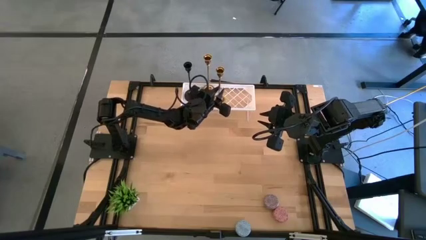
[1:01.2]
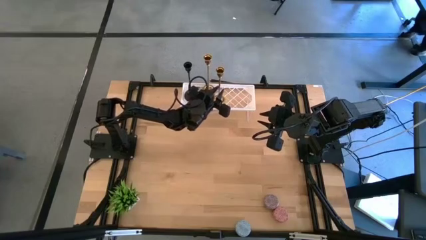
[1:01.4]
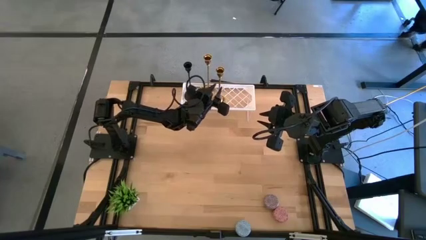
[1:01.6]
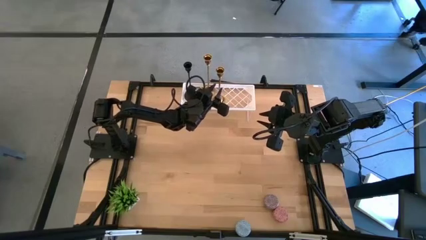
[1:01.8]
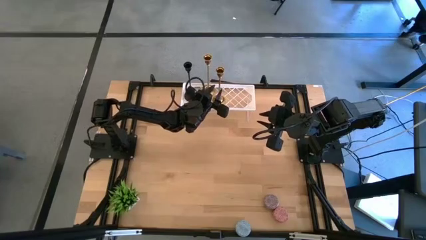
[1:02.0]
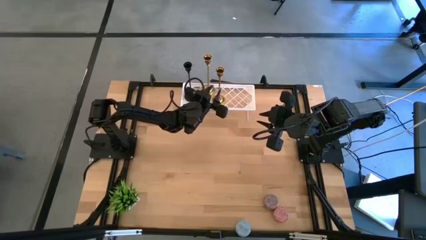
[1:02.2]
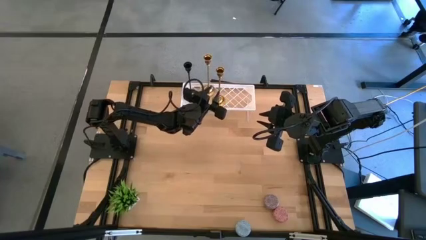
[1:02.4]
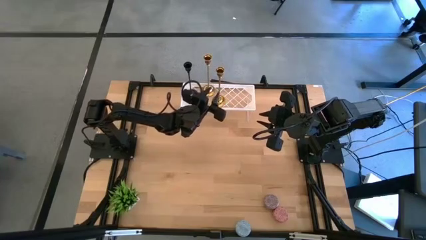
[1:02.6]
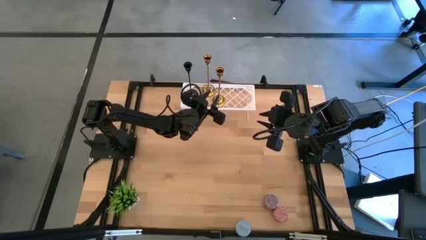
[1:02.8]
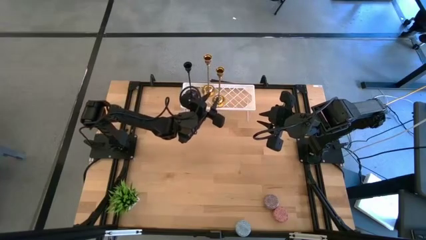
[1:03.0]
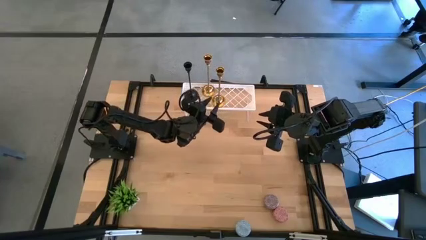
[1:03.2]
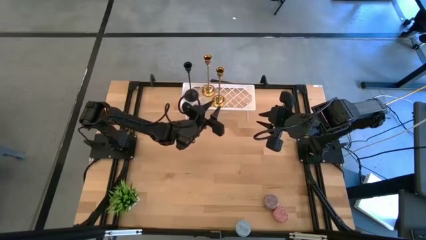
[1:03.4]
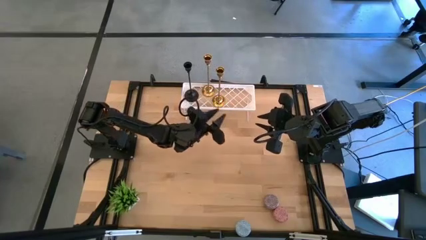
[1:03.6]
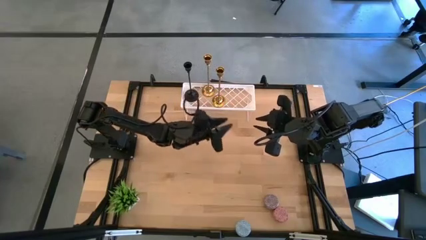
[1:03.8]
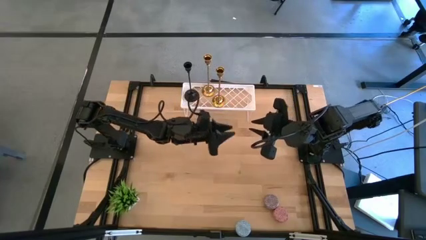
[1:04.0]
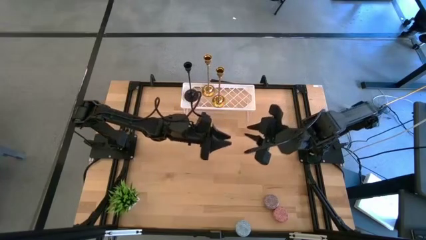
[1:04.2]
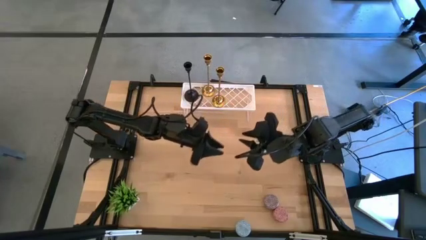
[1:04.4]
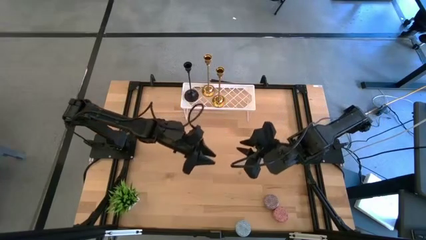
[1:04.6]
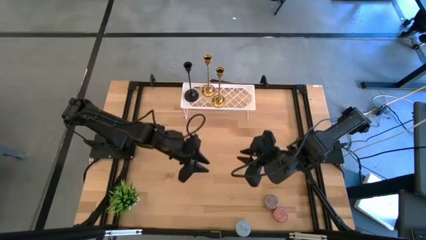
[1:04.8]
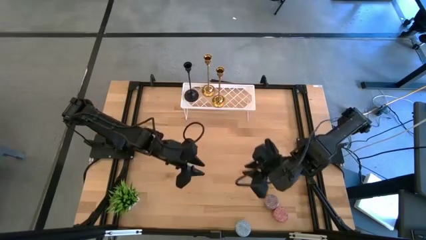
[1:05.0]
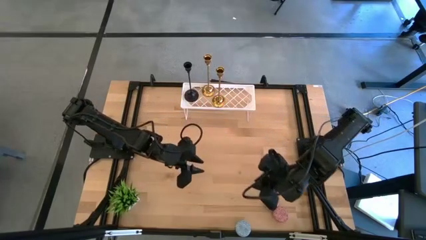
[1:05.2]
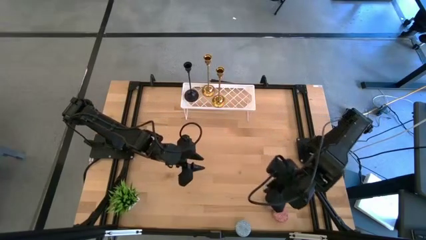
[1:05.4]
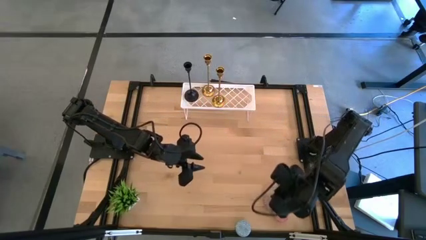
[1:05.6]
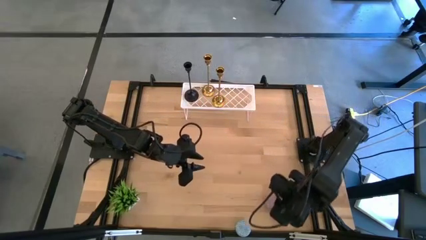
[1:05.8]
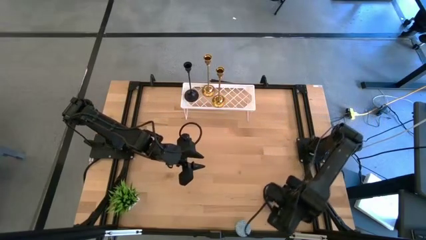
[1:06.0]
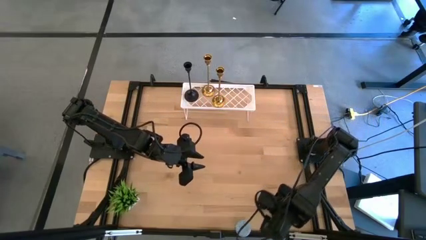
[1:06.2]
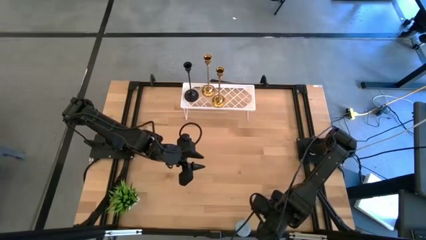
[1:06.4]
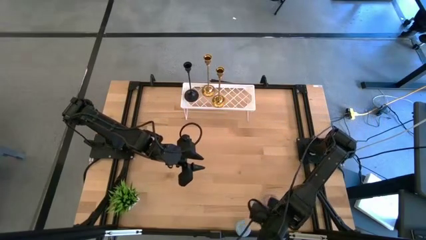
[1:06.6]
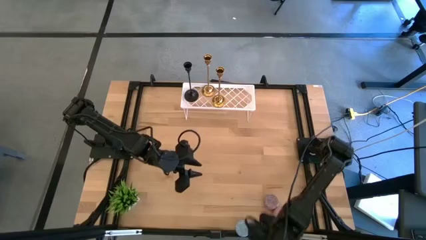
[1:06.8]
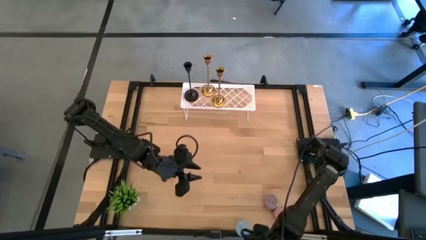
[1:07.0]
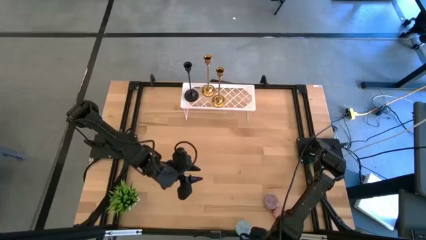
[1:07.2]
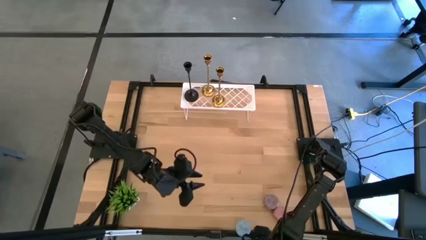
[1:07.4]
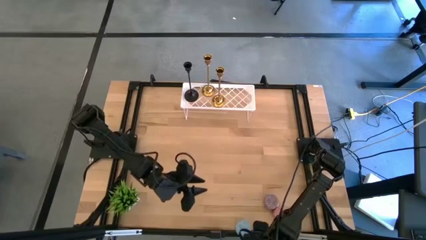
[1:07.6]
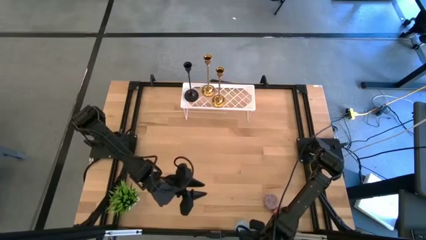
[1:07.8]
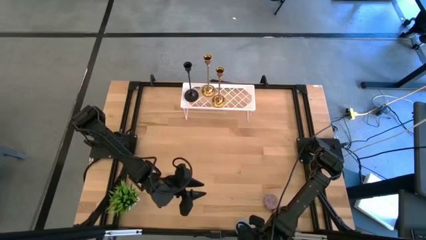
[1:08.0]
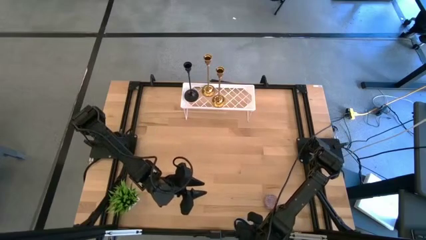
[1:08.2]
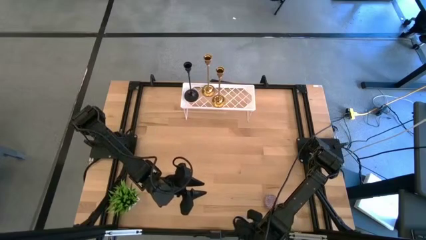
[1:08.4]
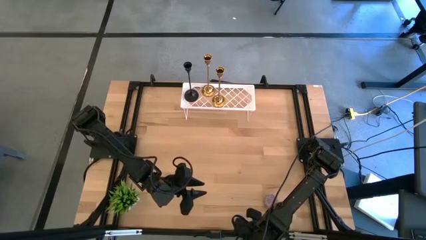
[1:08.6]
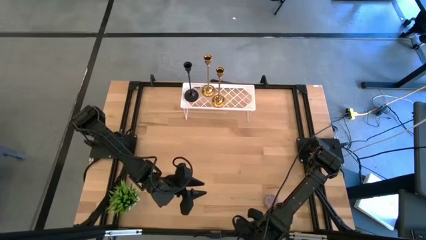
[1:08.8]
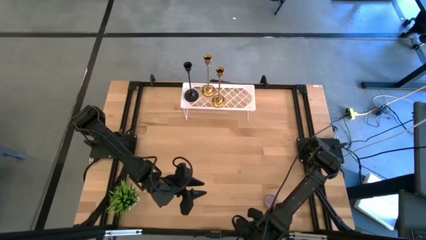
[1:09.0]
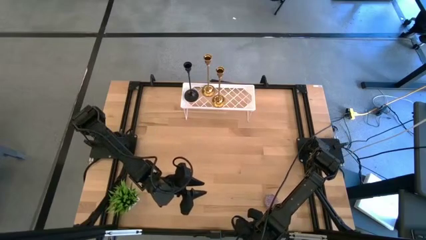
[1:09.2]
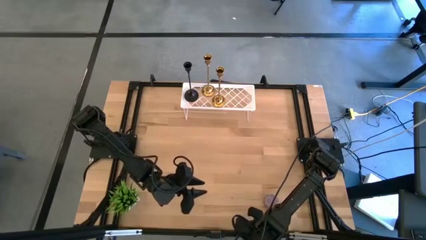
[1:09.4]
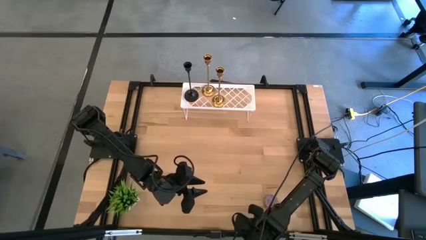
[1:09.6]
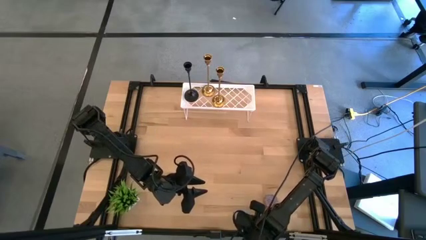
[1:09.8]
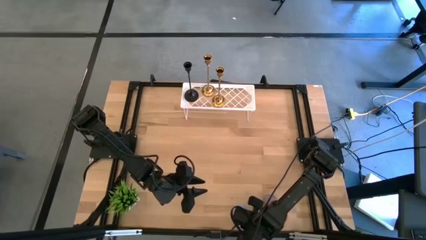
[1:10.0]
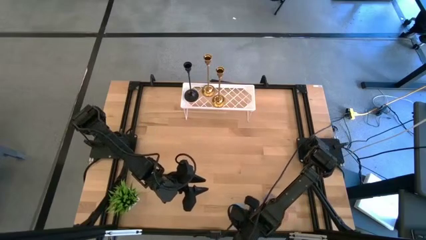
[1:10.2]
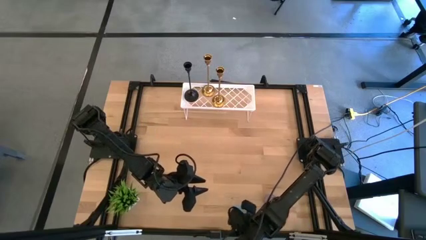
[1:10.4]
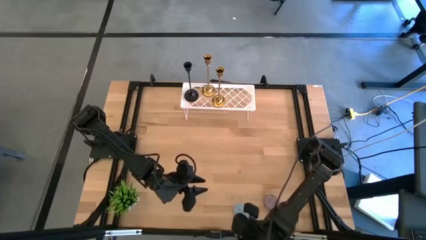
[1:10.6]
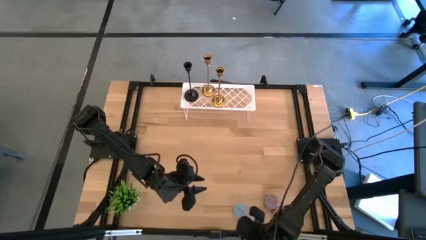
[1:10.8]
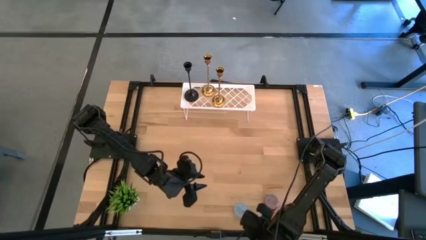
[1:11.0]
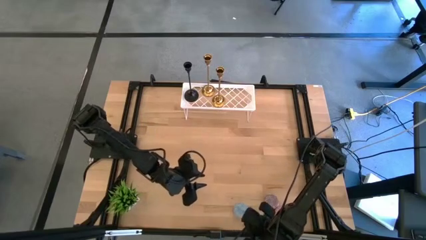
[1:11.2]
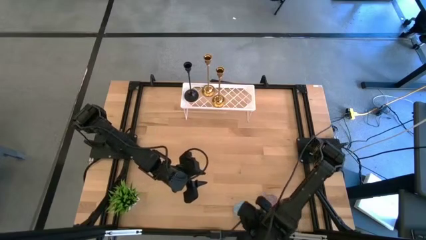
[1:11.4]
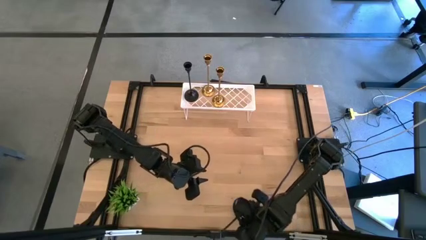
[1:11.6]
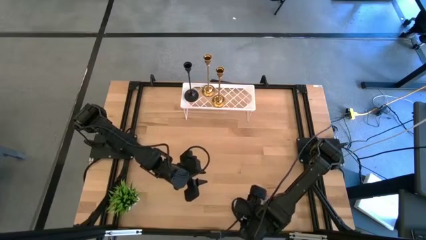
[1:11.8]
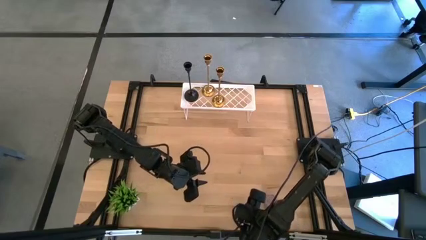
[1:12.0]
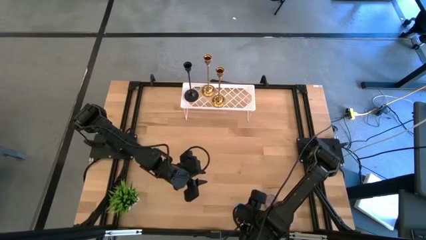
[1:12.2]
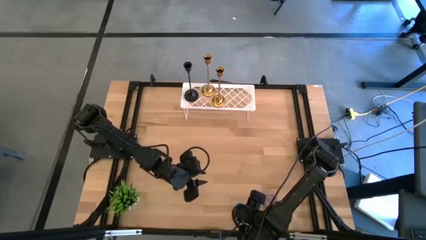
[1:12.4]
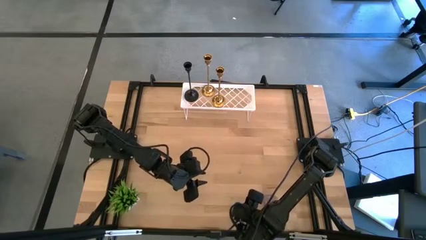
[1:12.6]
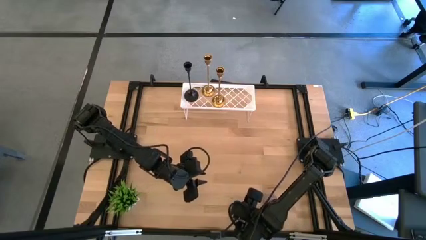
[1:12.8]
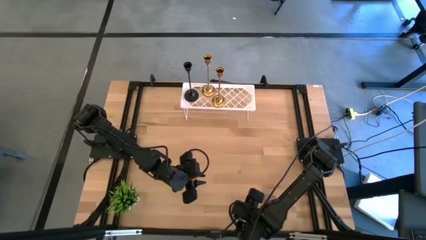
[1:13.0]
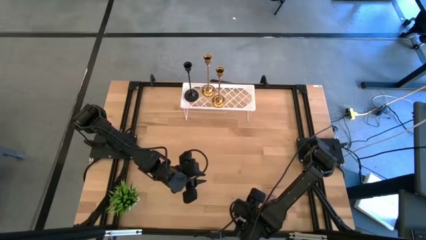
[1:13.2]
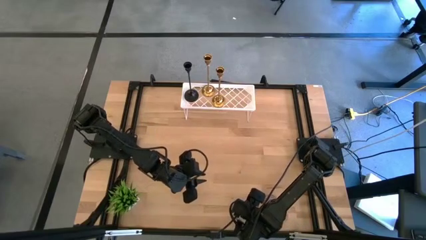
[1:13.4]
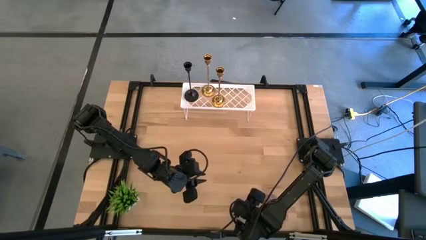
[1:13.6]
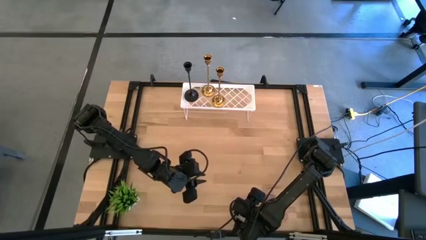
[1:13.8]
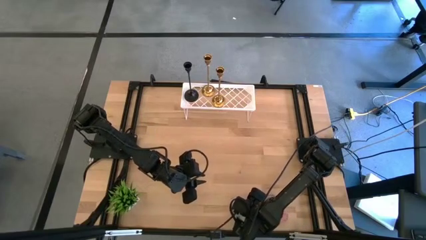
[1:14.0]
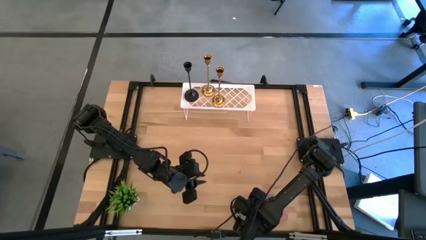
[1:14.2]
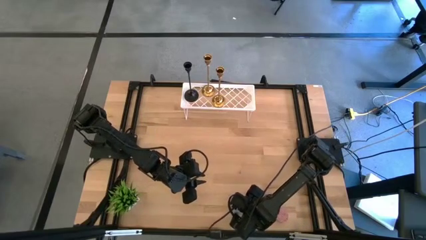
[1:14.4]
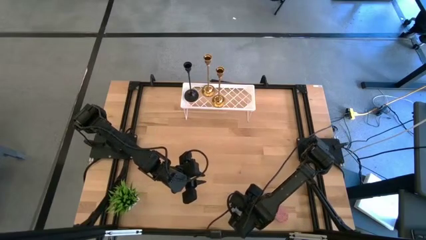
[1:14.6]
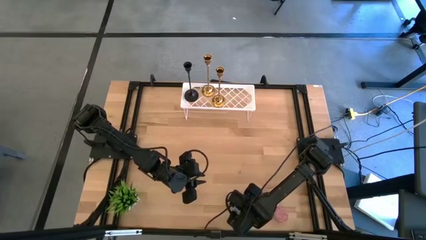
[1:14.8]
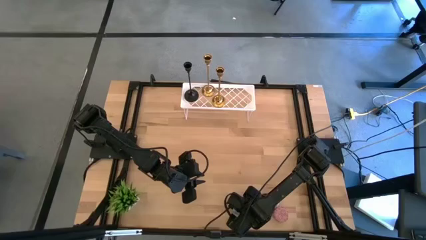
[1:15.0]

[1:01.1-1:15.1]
Task: Pick & Place candle stick holders
Put the blue patterned scented candle on the shelf
